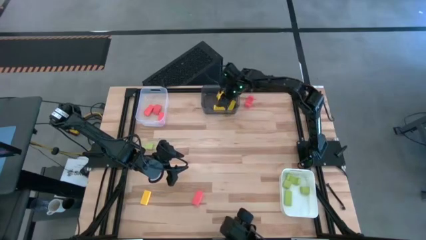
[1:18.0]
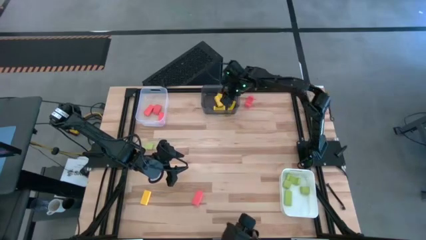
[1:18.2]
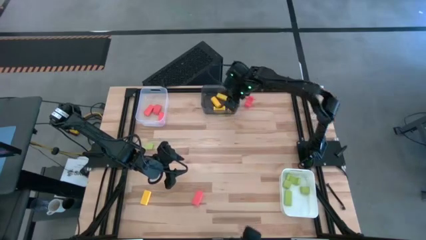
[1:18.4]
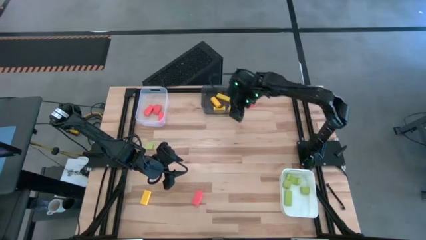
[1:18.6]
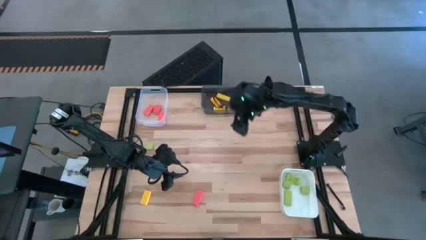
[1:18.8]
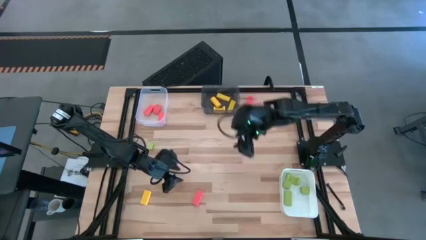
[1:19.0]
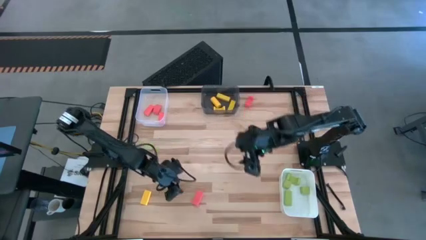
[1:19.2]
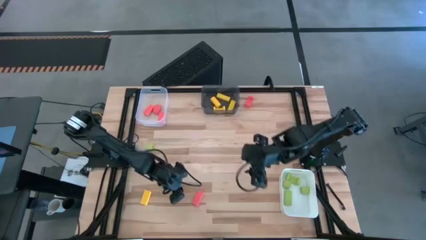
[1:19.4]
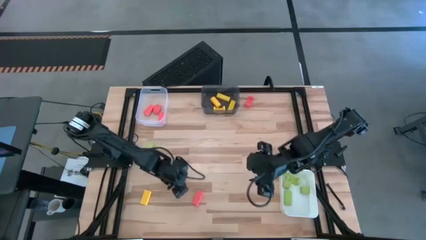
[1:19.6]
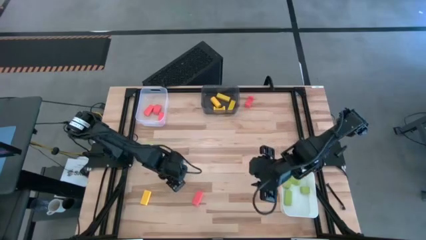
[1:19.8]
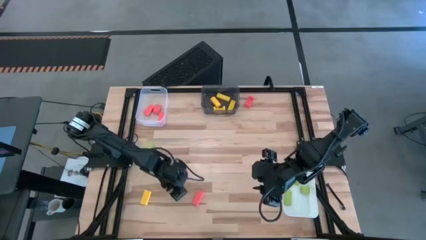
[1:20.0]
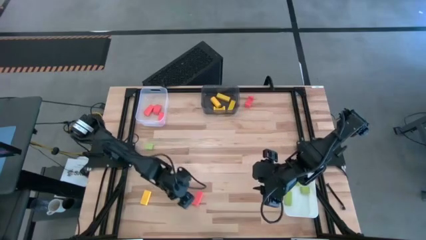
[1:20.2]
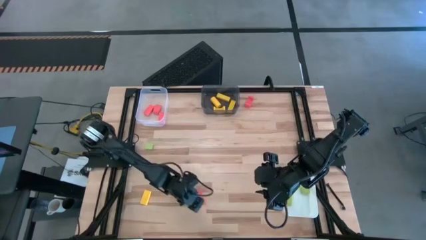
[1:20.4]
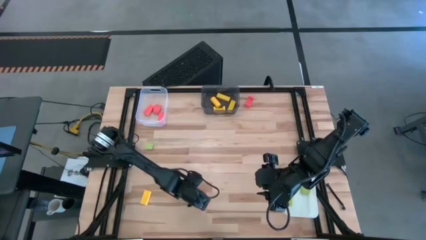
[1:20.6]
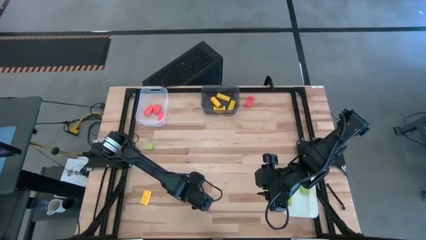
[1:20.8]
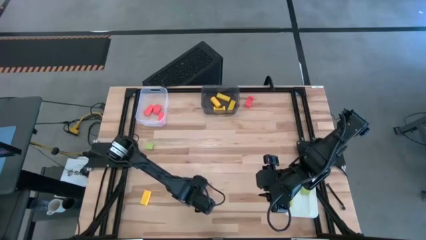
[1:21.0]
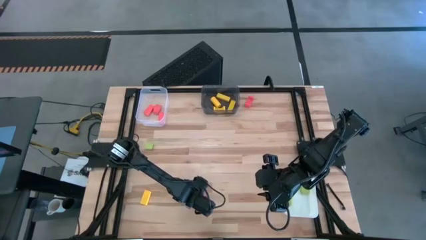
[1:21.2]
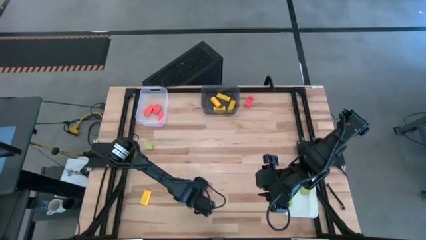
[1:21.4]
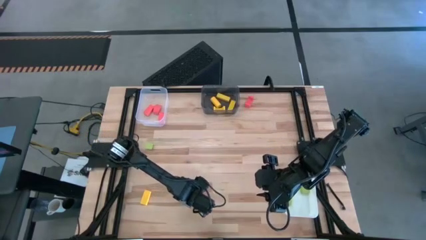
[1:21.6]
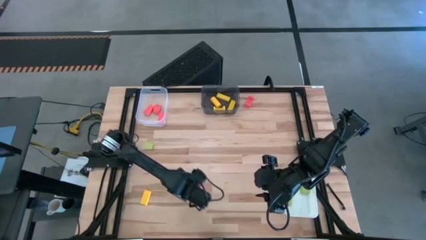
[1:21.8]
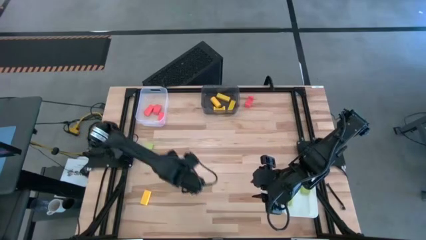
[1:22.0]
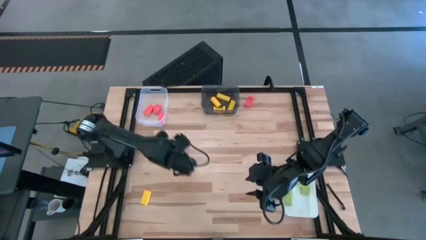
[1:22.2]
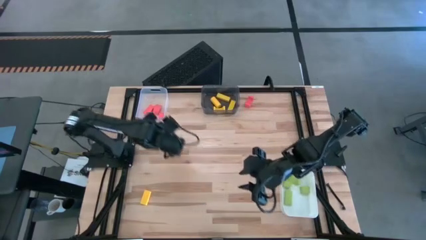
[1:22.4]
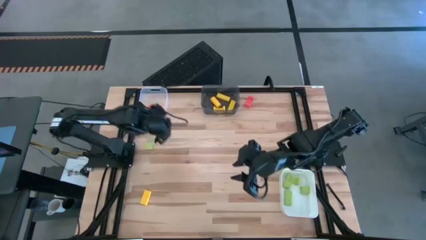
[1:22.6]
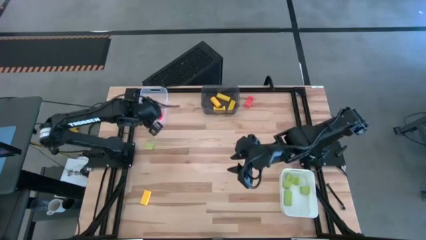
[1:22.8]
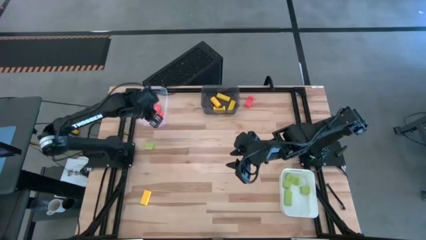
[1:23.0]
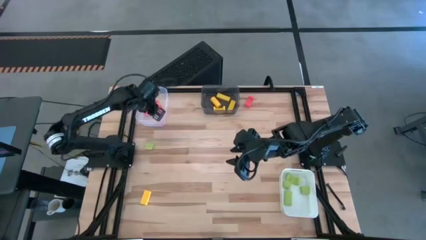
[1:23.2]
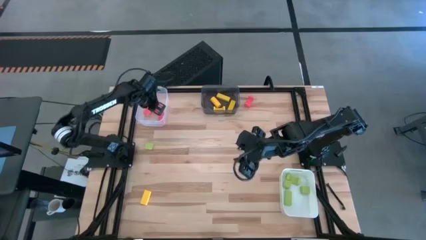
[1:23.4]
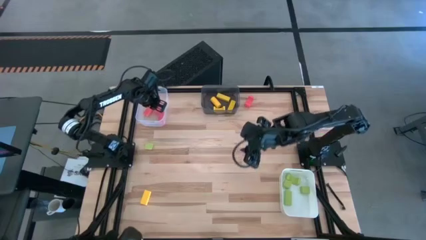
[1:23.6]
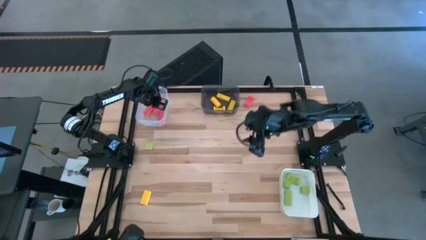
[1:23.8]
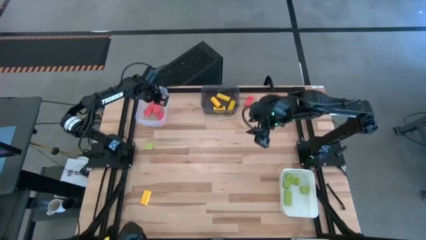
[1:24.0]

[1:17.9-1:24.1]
Task: Sort & place blocks by color
Put the yellow block into the black bin

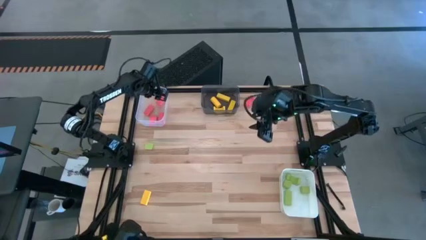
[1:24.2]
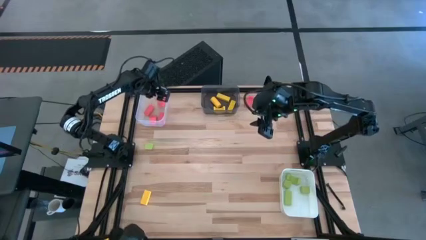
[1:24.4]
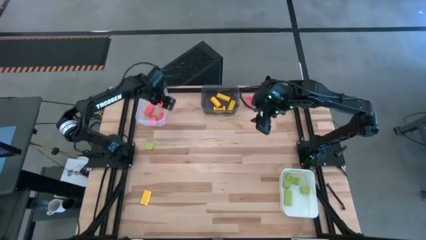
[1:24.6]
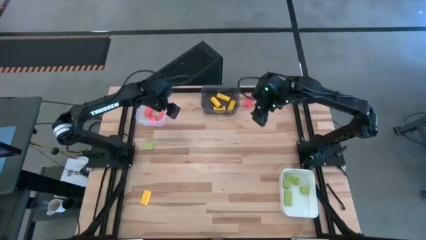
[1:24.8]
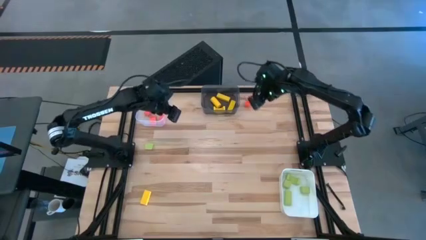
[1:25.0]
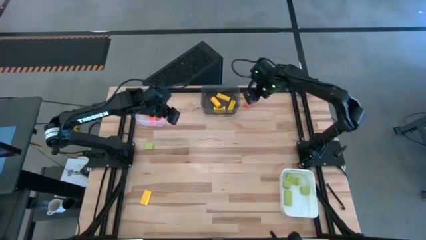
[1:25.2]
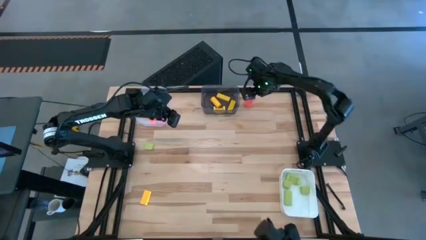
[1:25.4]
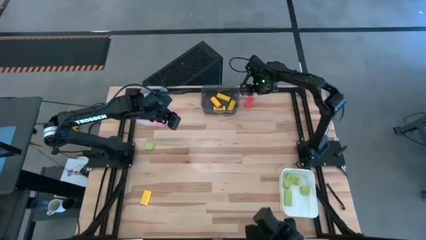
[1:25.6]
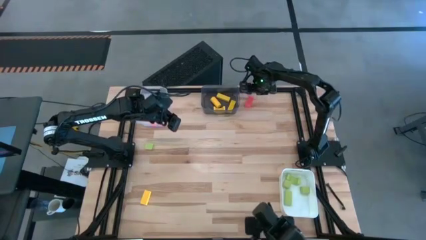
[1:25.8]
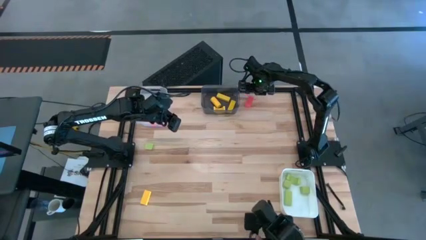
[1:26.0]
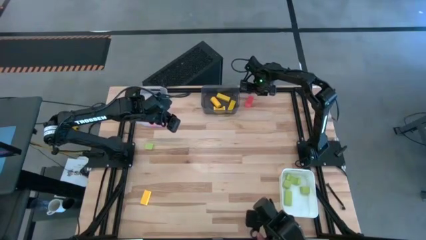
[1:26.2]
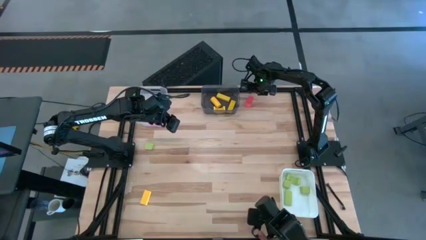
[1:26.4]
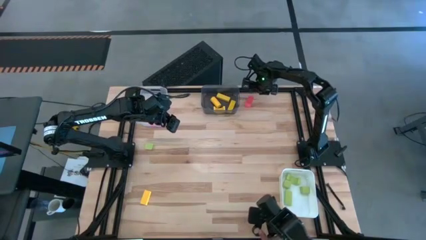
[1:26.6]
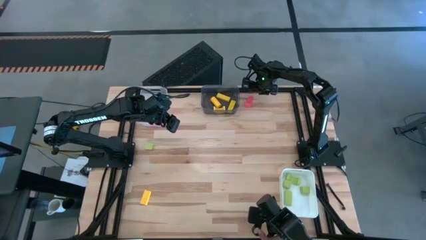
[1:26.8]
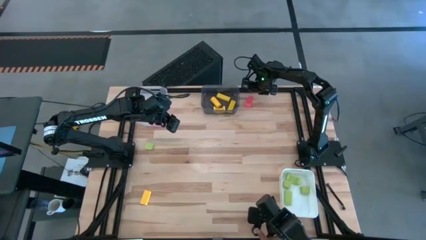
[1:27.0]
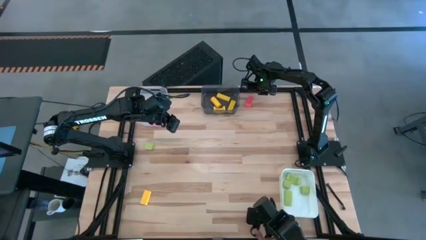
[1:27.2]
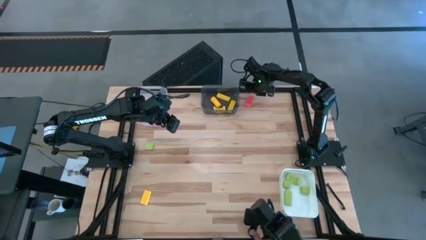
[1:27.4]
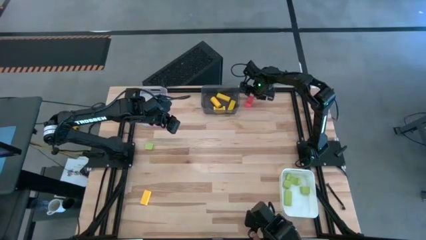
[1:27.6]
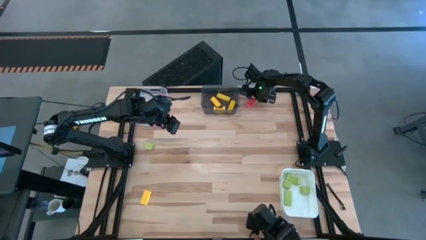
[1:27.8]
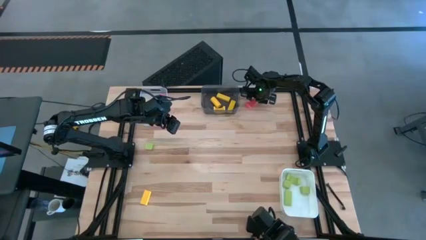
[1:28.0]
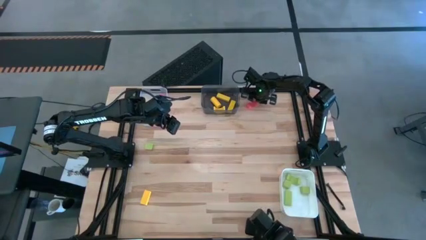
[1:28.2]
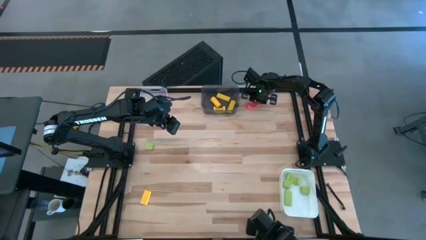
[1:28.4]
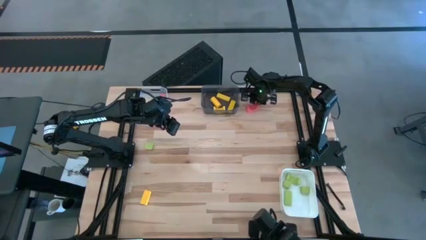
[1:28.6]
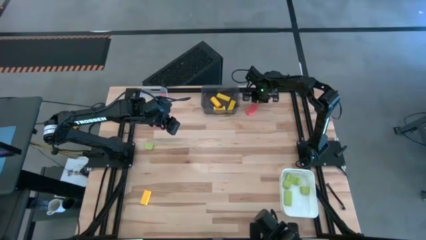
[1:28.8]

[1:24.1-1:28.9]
Put the pink block into the transparent bin

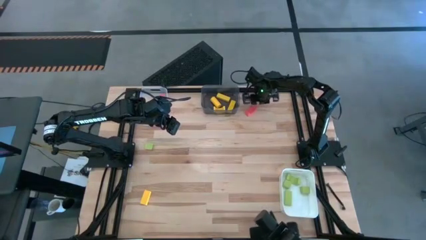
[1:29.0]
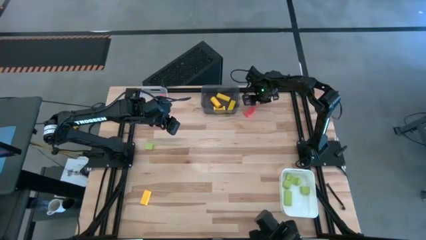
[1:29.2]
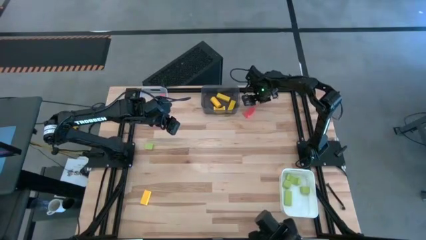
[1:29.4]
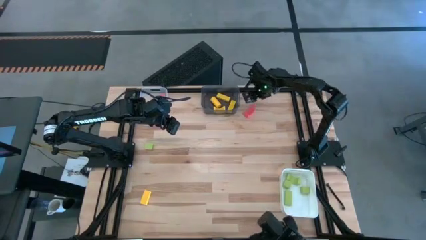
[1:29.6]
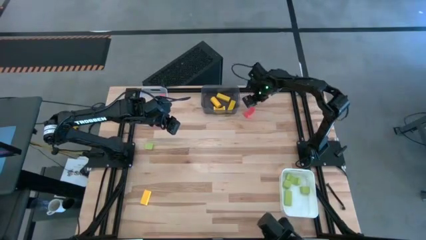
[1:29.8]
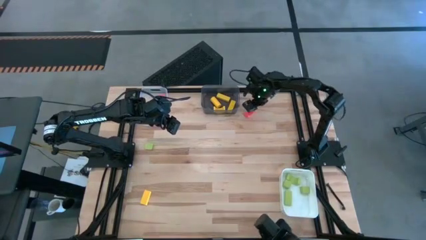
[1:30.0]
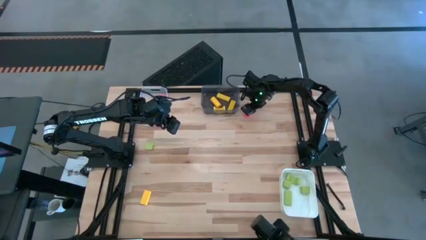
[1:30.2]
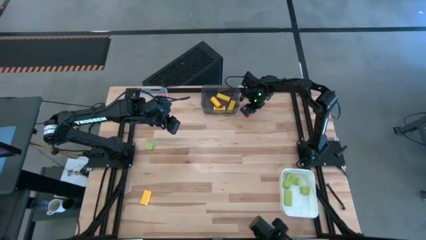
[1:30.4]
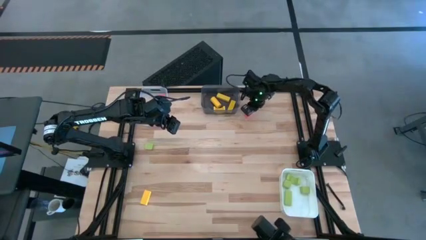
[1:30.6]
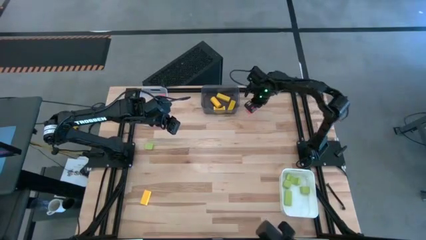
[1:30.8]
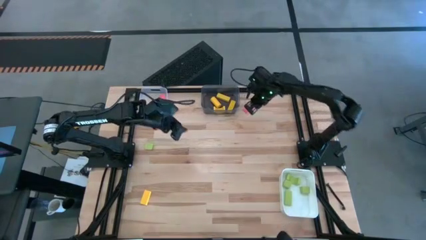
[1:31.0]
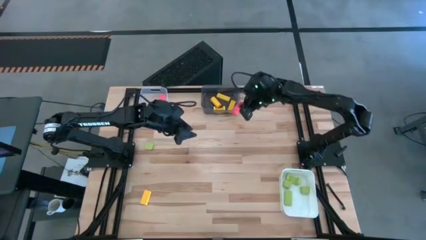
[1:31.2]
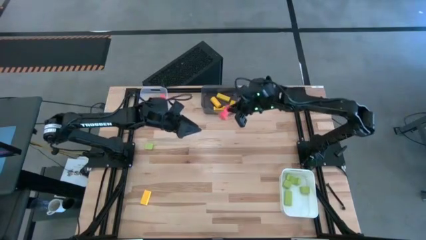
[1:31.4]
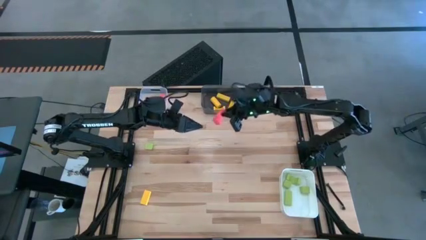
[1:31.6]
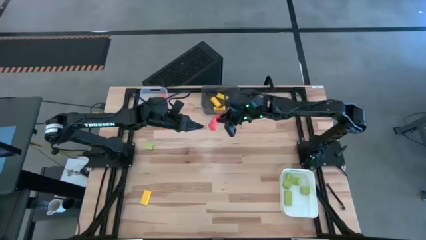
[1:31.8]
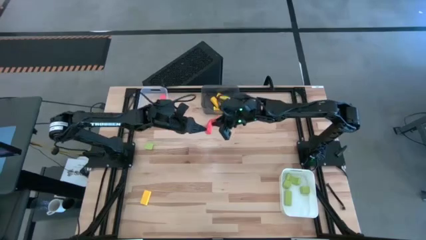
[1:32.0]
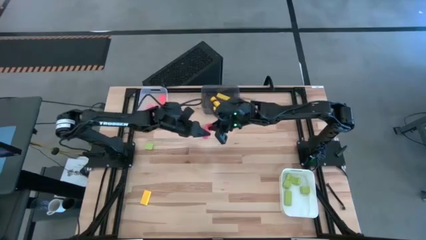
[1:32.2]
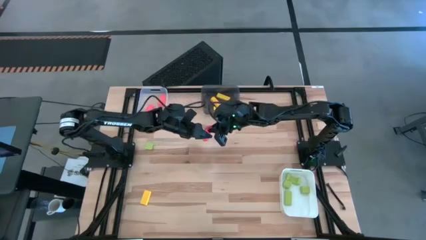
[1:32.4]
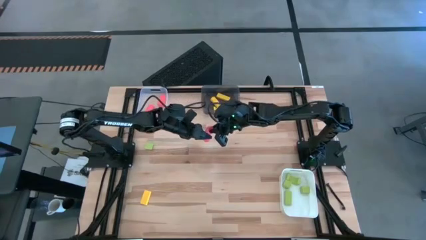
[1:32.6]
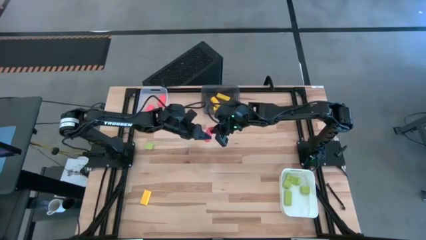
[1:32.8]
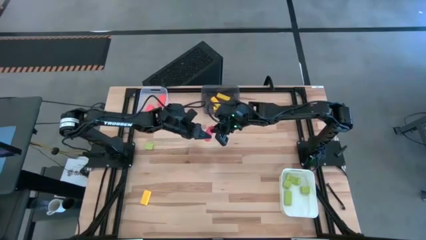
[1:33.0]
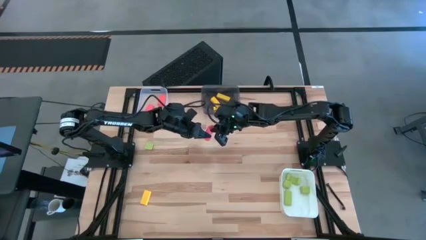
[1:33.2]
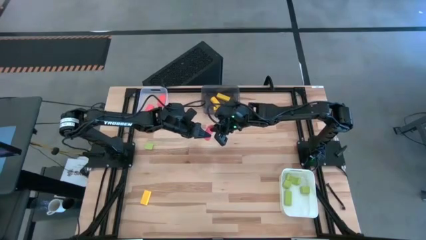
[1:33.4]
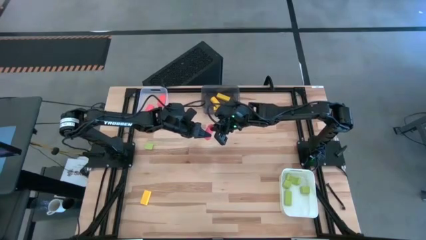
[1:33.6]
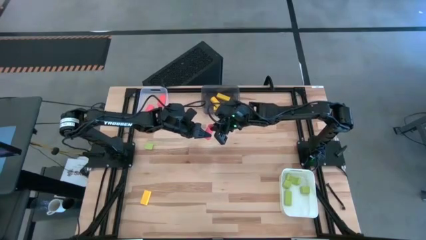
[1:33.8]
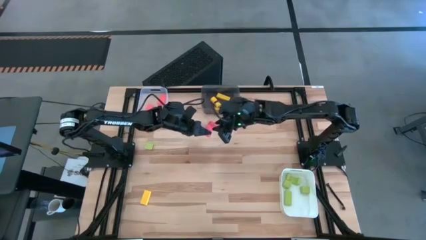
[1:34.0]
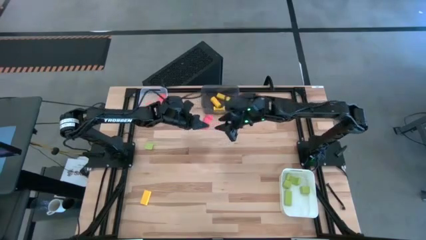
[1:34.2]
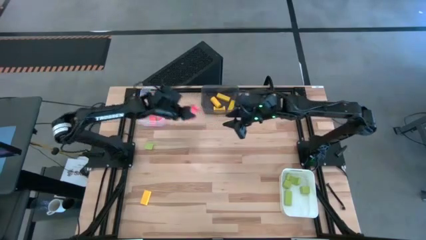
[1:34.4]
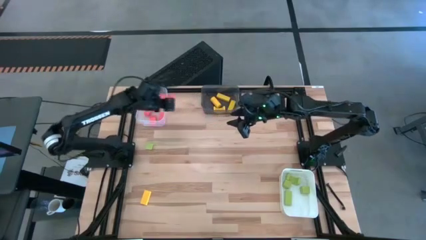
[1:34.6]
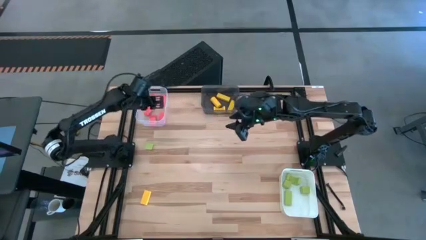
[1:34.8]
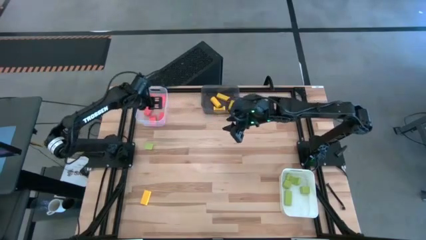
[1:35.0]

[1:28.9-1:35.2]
Put the pink block into the transparent bin
